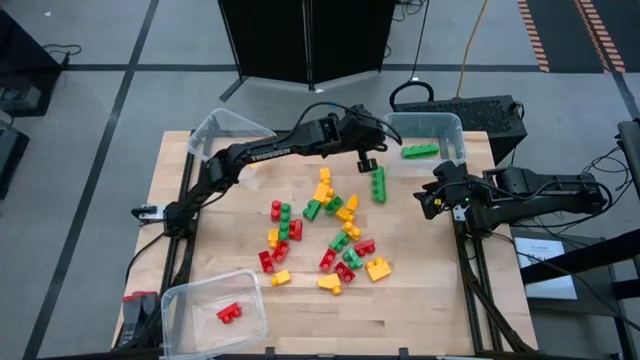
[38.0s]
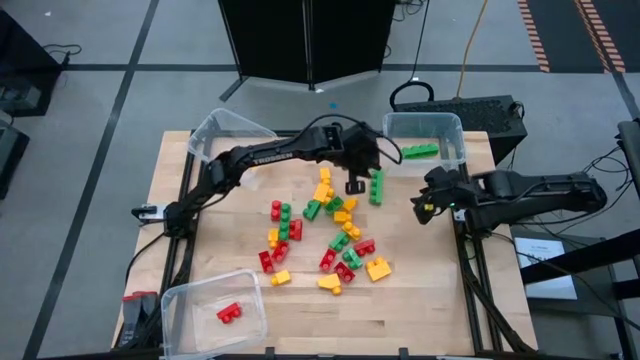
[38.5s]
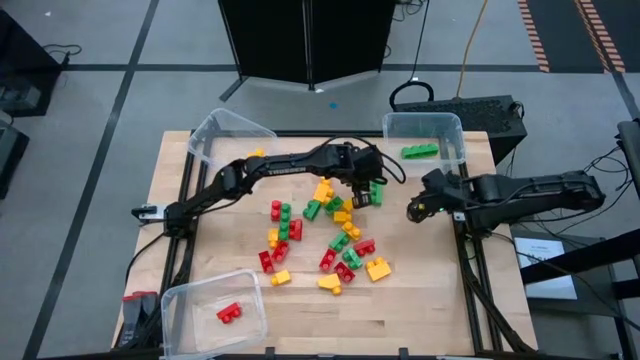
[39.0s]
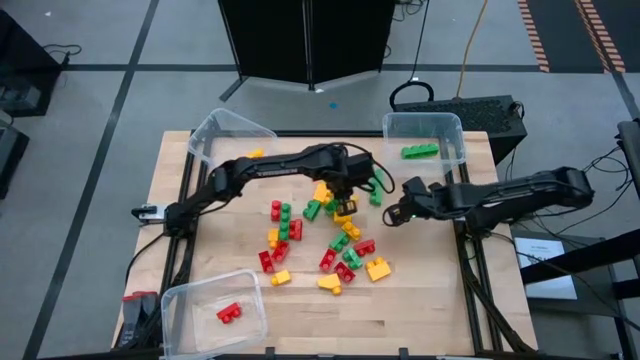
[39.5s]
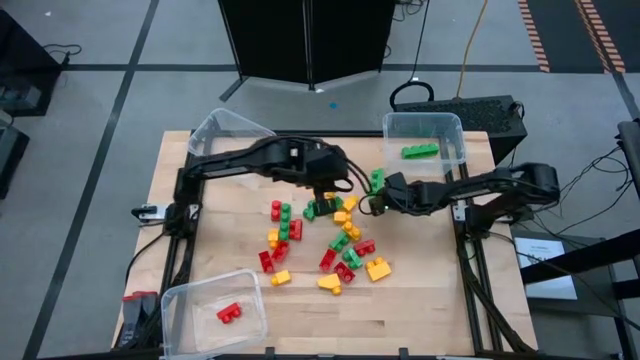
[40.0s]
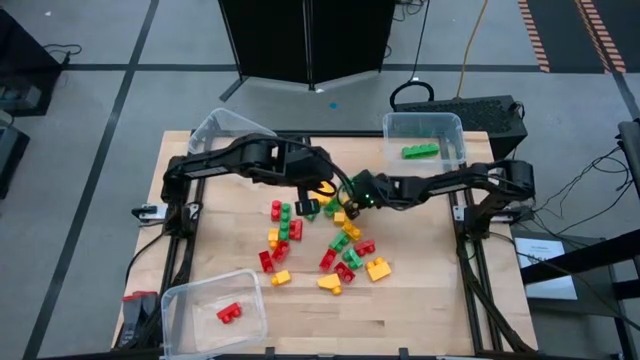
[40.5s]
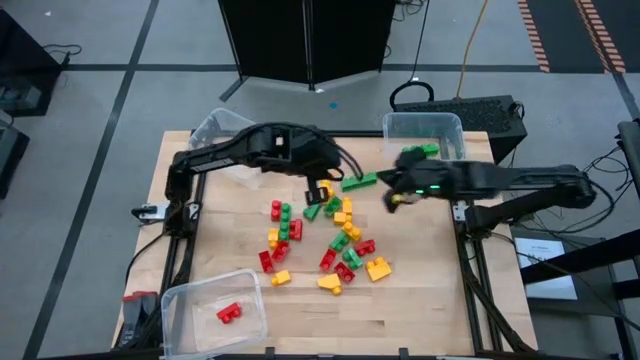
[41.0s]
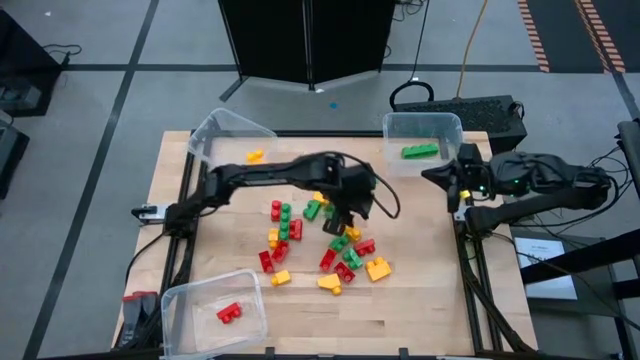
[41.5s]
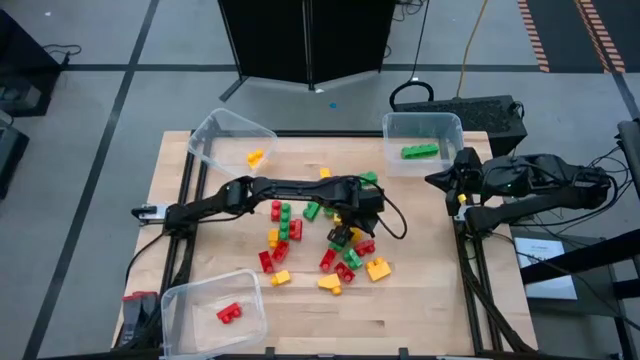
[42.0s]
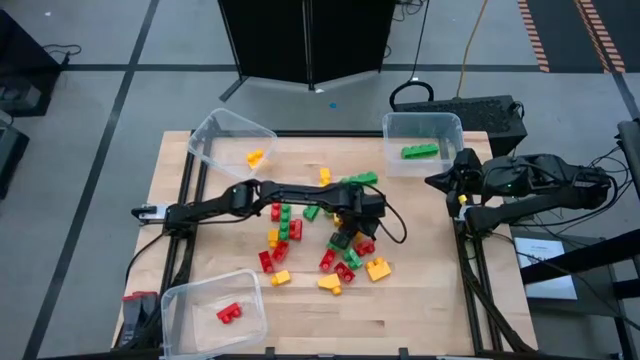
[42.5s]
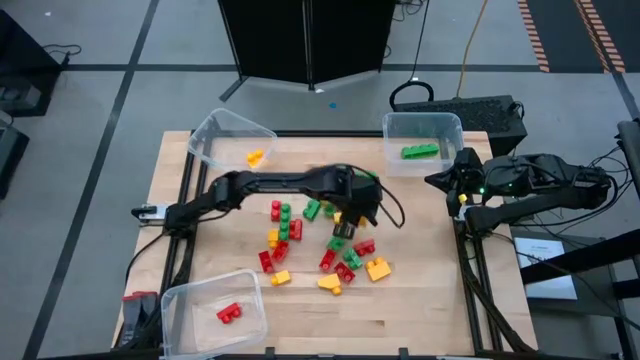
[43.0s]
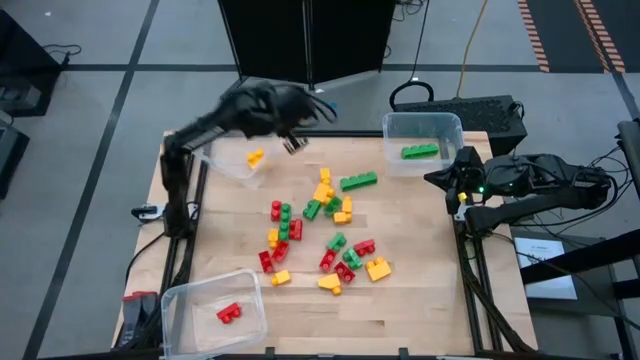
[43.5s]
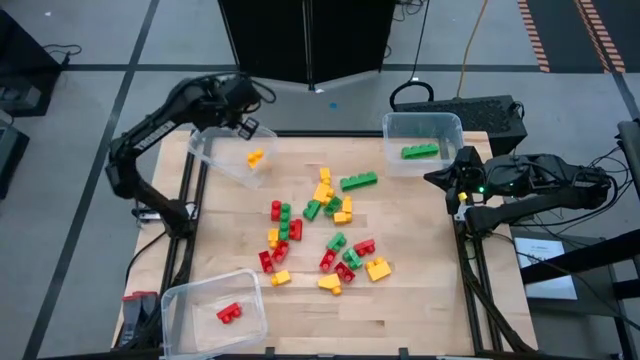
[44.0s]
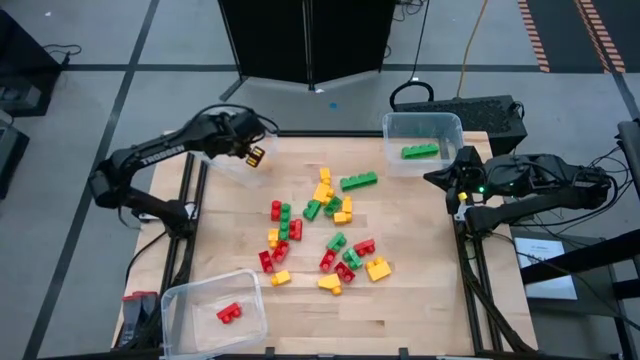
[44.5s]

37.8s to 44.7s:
Task: Sort blocks
Put the yellow game piece into the top left transparent bin

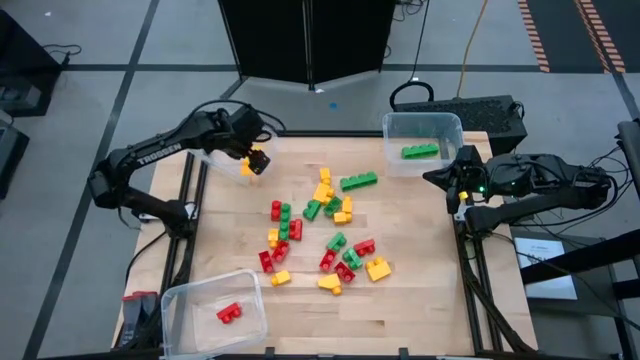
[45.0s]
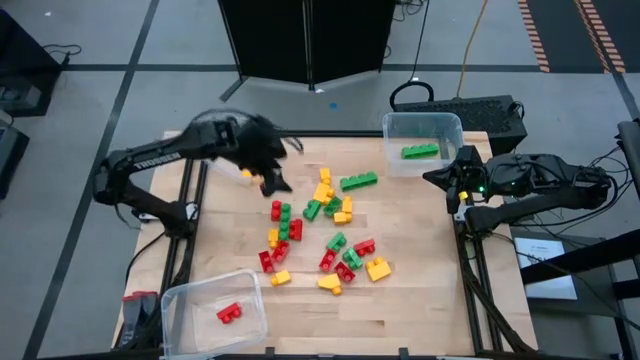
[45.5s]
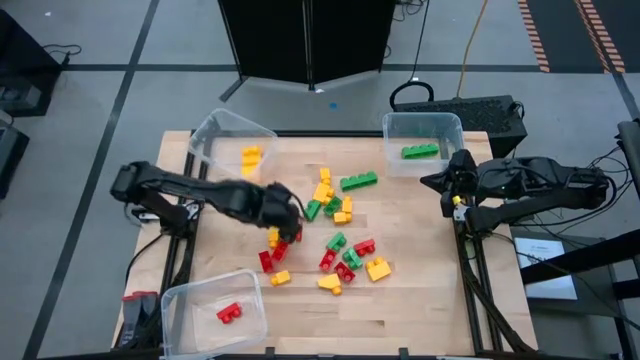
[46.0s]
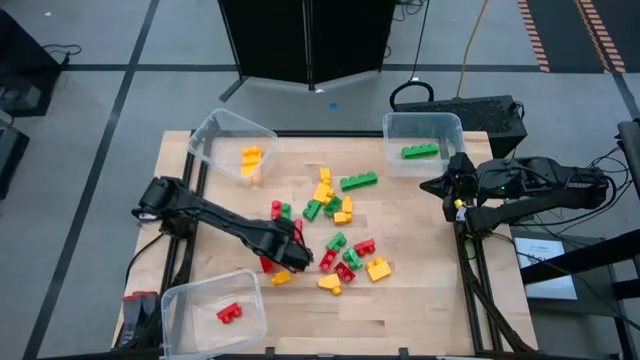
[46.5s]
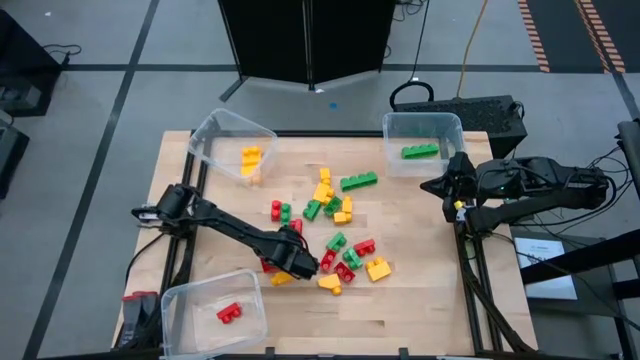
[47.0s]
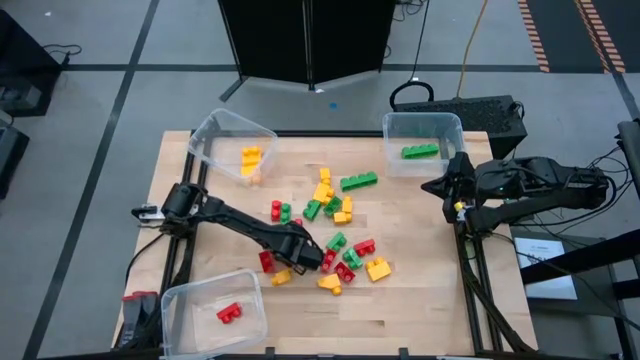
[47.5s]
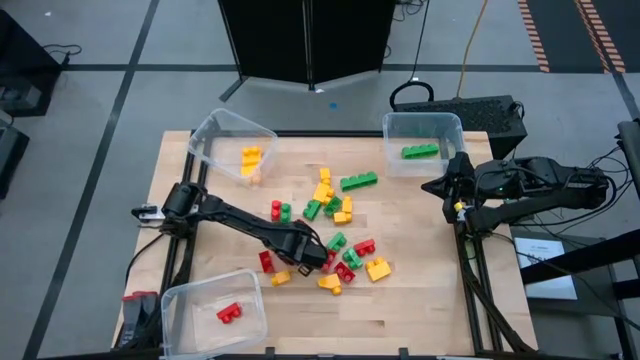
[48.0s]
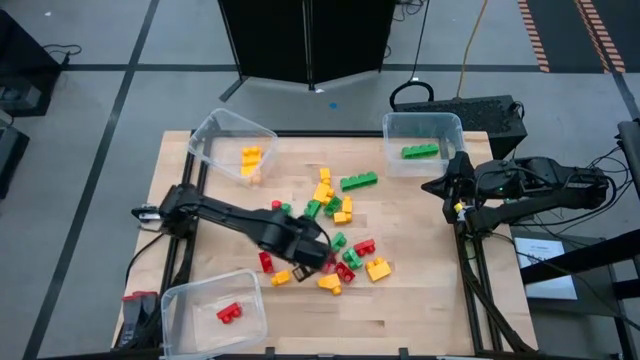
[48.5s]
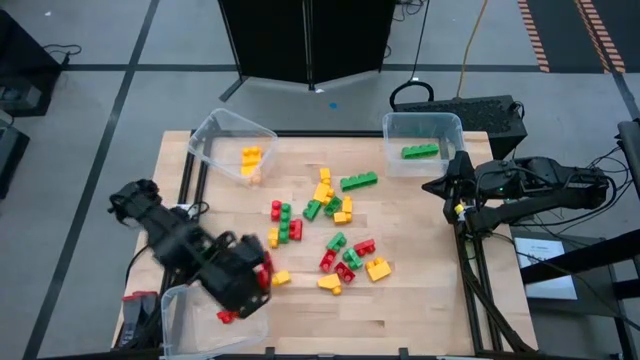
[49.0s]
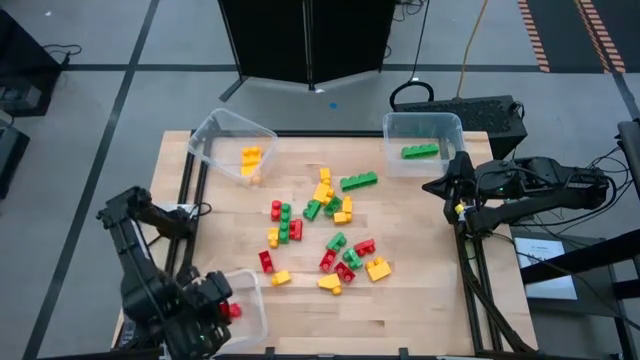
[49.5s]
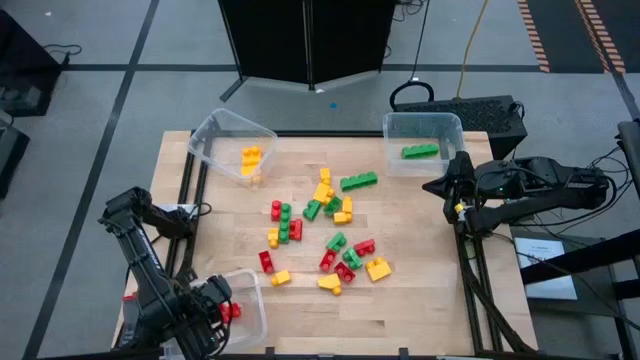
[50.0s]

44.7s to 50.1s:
Put the red game piece into the bottom transparent bin

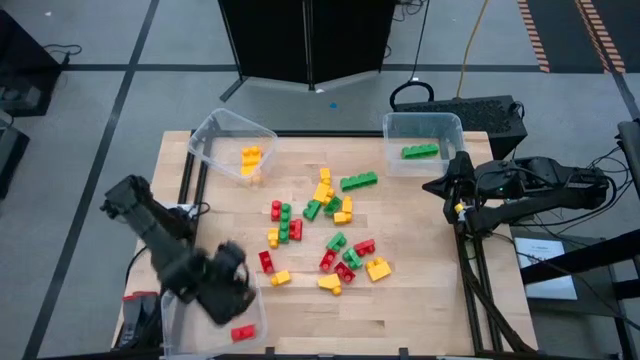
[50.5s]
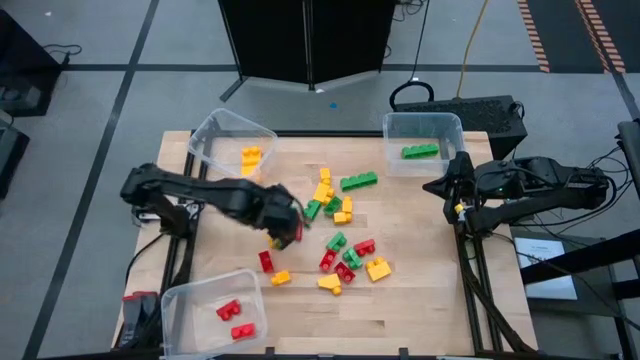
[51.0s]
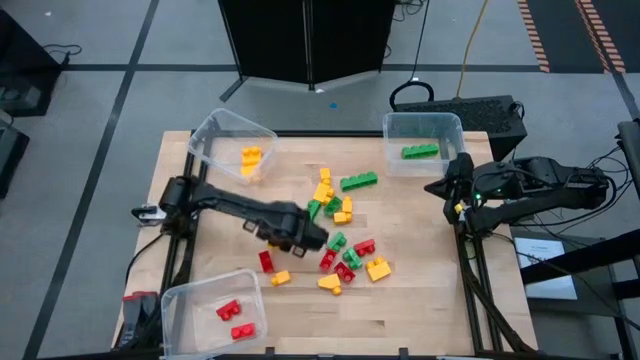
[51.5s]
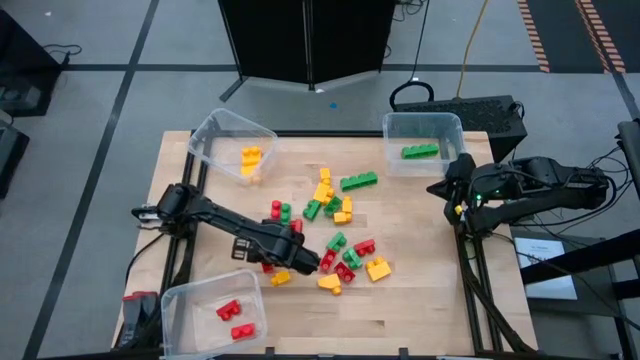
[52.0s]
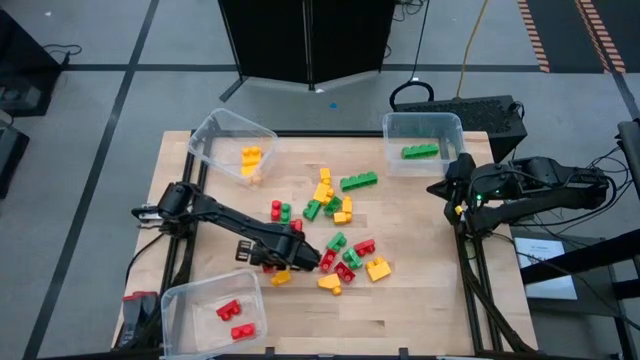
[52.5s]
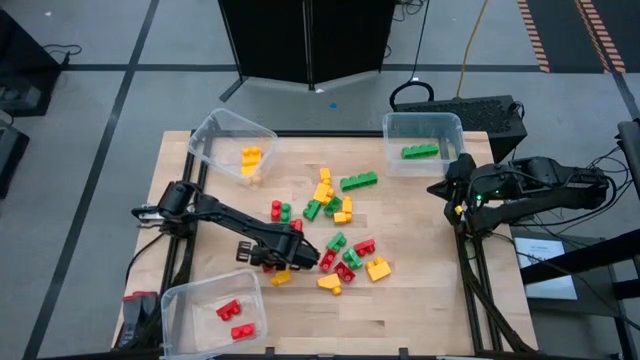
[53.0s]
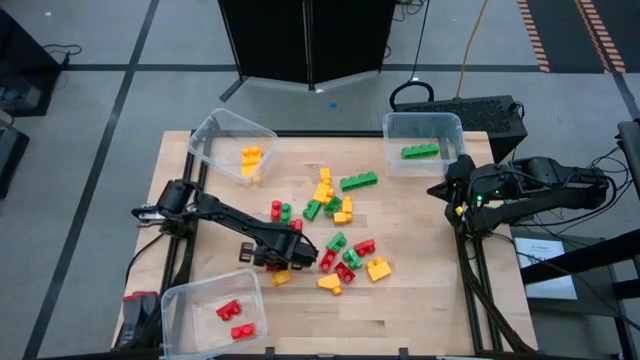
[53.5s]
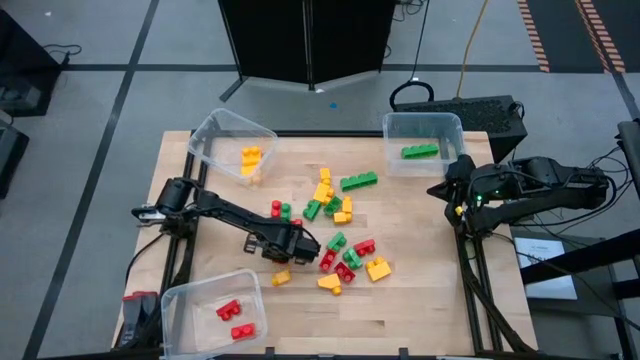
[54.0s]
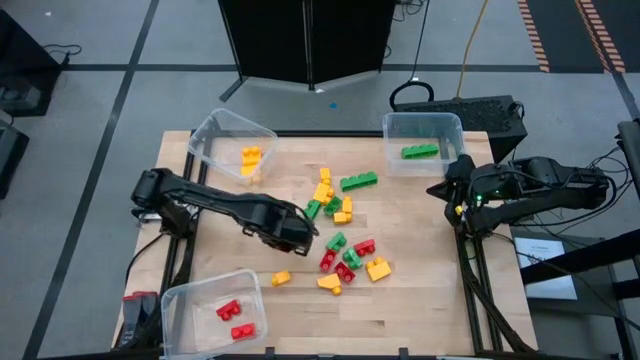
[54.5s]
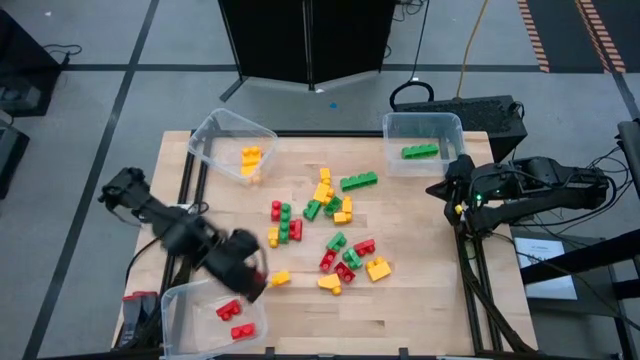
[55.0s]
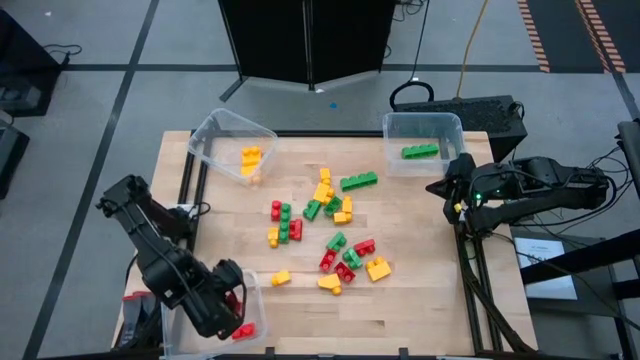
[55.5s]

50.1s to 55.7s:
Put the red game piece into the bottom transparent bin

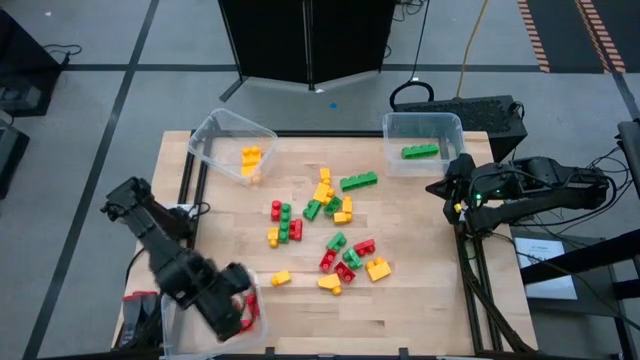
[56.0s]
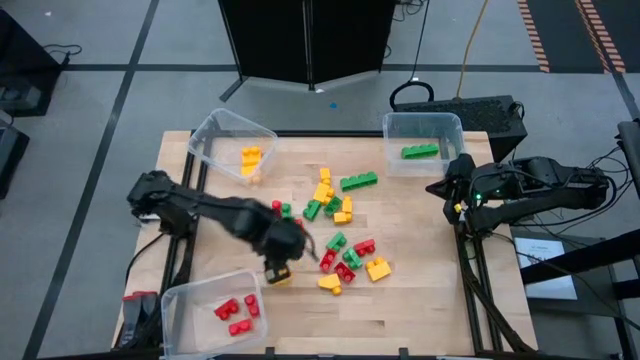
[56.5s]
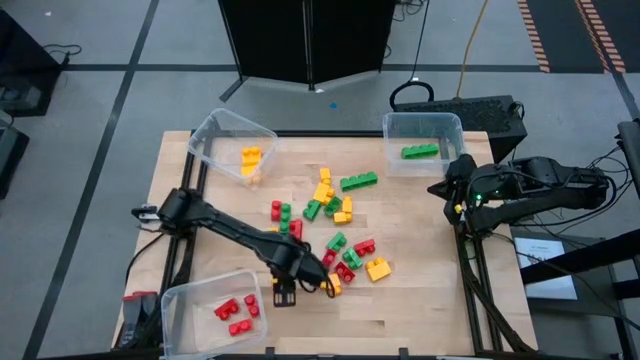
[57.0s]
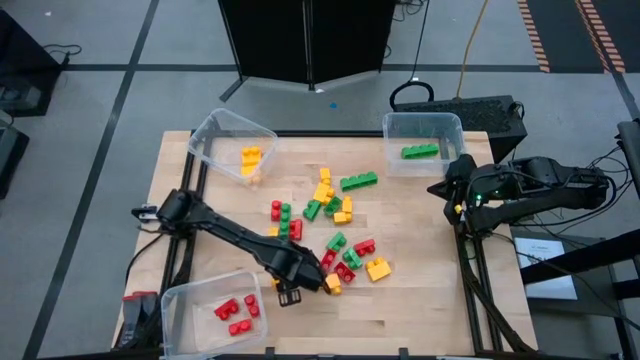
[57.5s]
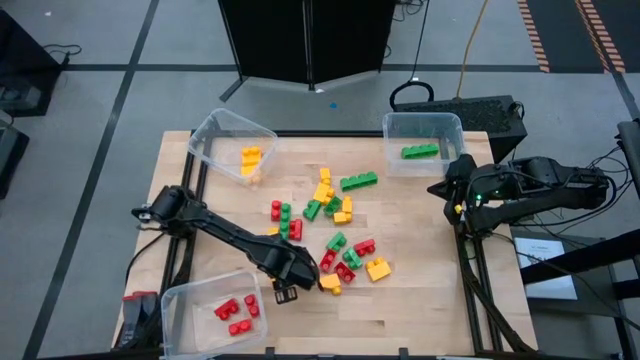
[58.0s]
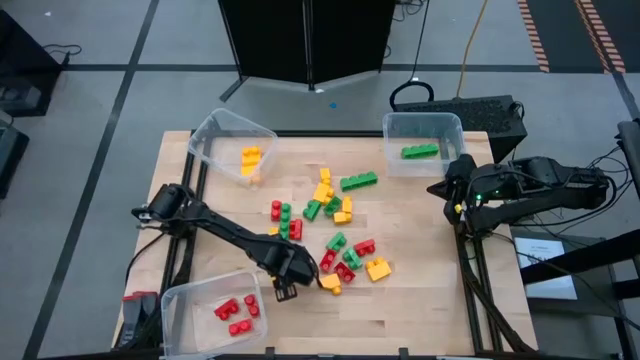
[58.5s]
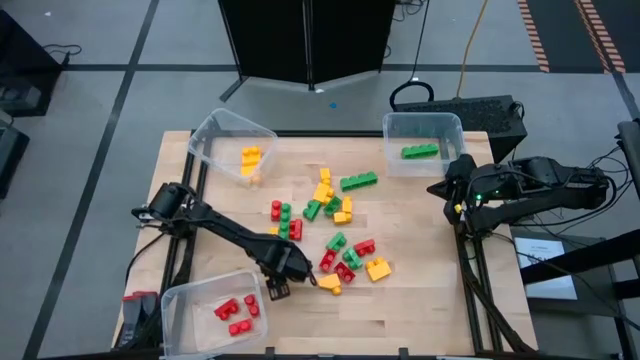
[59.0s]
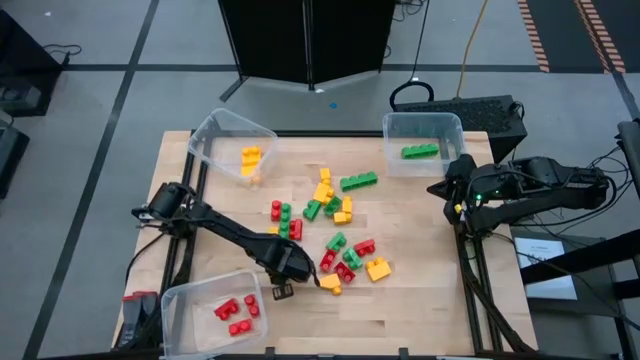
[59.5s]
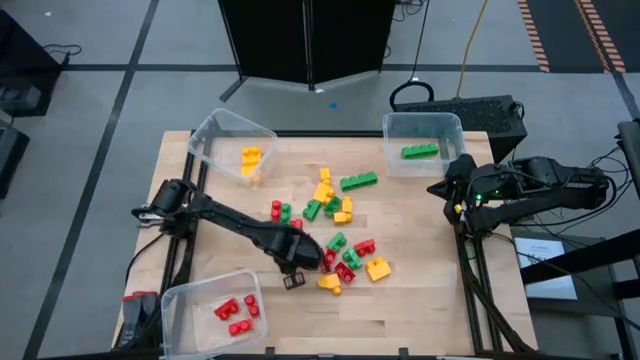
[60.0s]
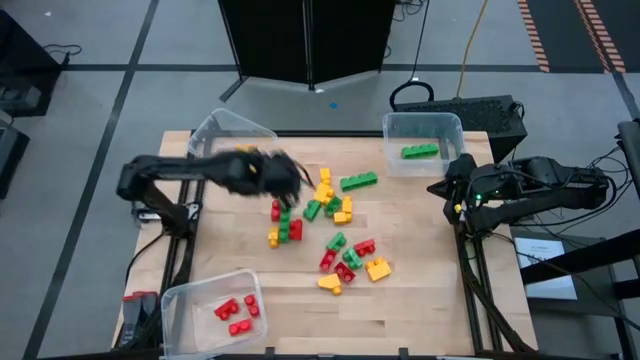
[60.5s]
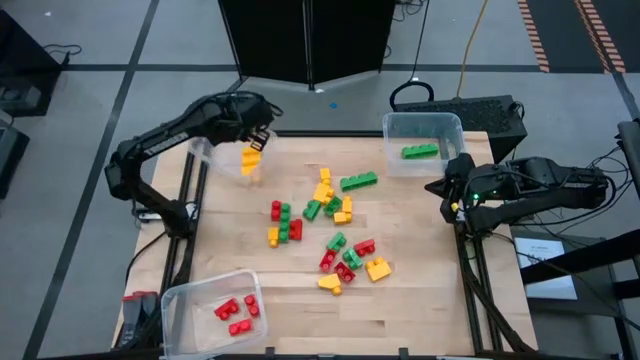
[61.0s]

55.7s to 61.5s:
Put the yellow game piece into the top left transparent bin
